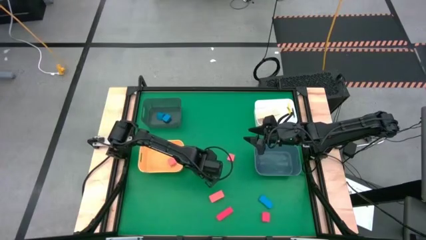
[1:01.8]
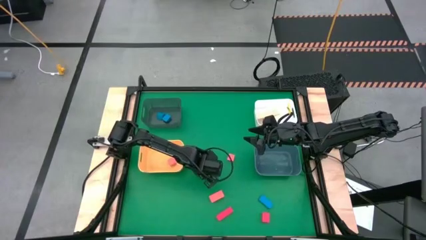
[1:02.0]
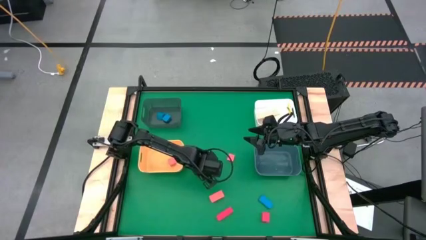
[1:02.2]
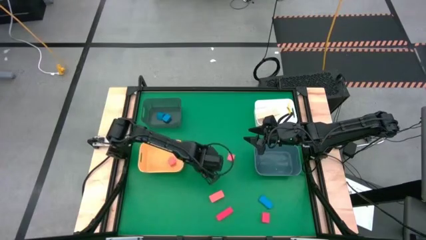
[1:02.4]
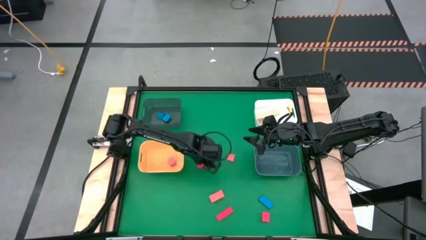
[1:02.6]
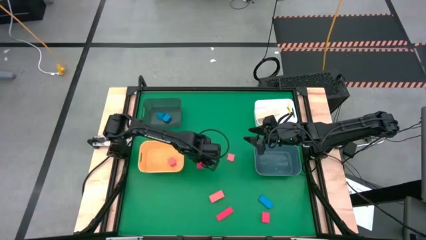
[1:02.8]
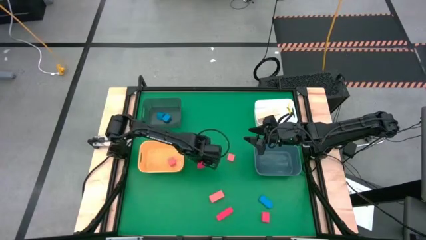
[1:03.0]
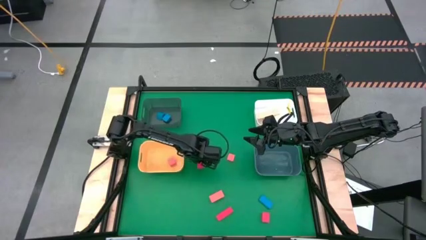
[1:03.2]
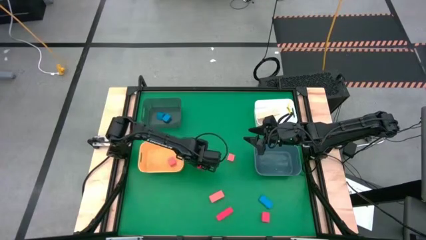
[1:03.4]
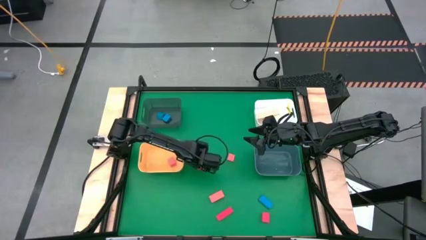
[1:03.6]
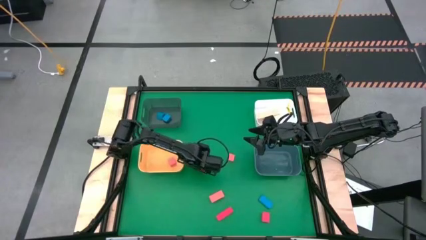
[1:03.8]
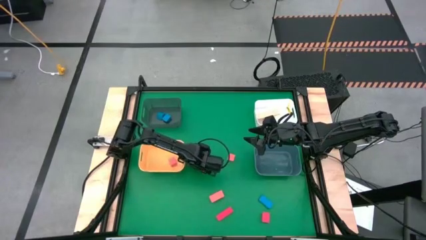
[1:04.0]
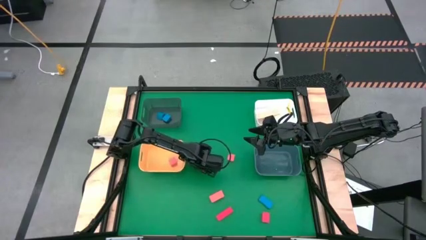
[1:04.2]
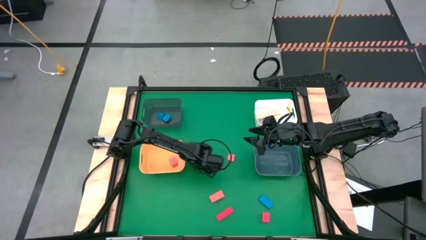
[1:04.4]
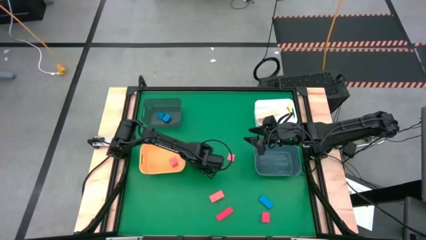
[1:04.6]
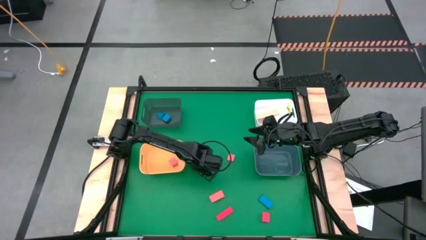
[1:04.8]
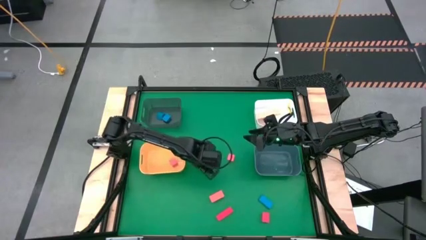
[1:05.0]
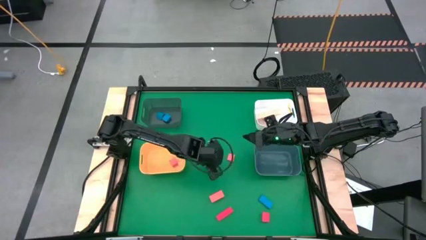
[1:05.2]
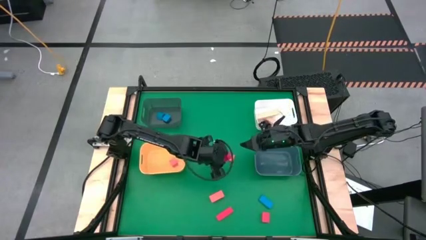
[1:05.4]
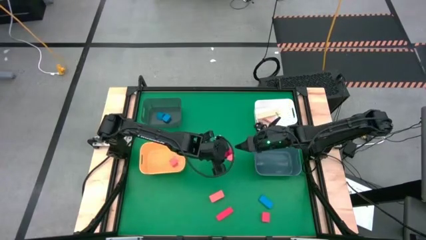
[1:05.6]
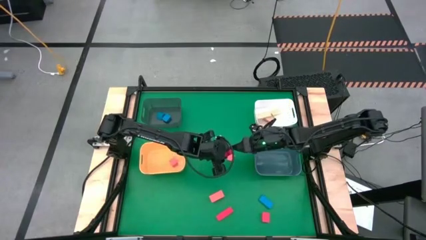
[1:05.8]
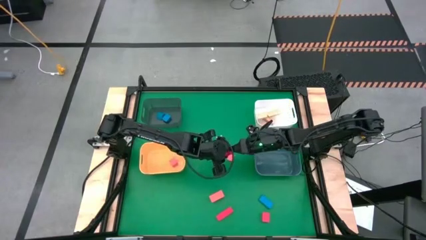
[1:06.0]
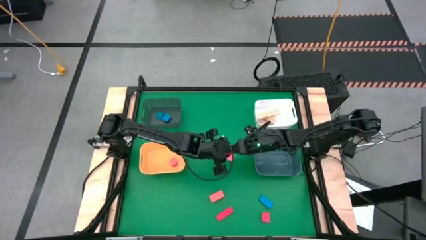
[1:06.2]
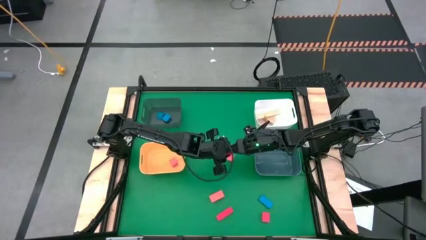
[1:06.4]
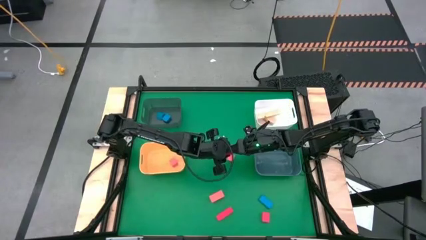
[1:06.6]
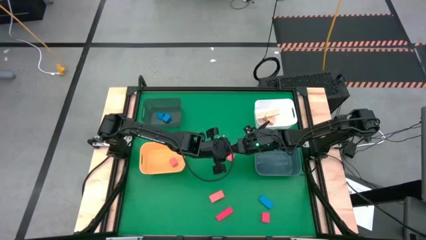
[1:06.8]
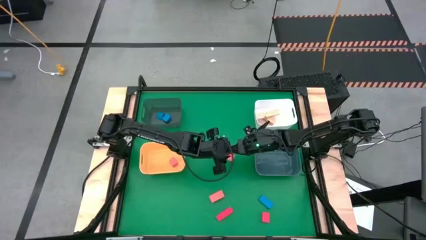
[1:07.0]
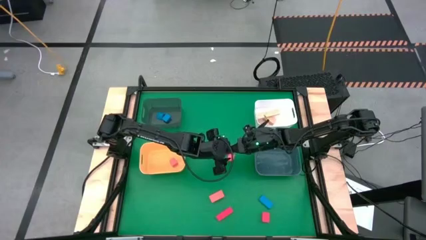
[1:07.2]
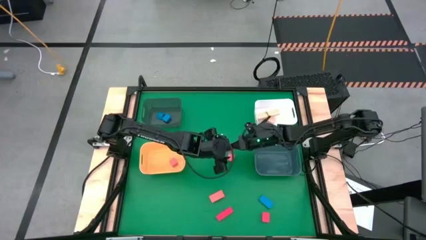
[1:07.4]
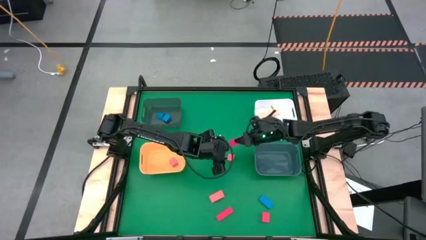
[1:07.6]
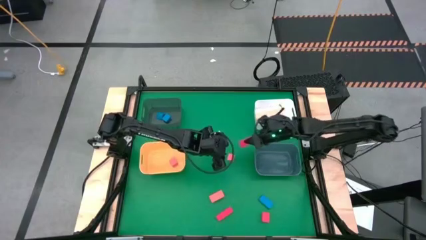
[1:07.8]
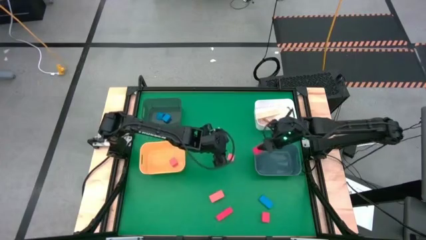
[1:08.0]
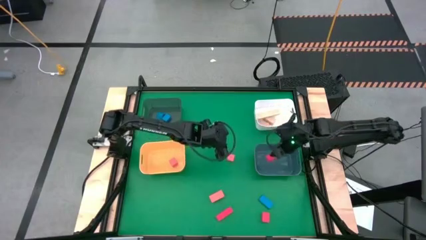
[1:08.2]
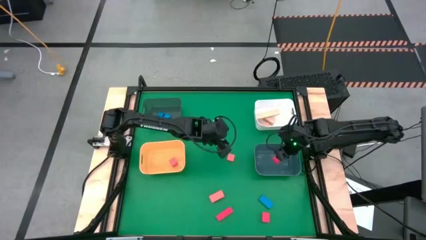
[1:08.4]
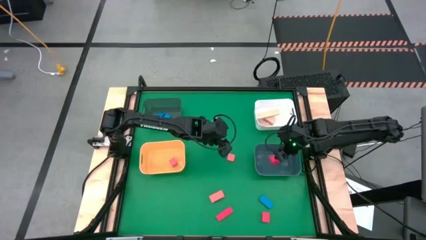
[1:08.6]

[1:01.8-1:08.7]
Task: Sort & place blocks by color
Put the top left red block into the green bin

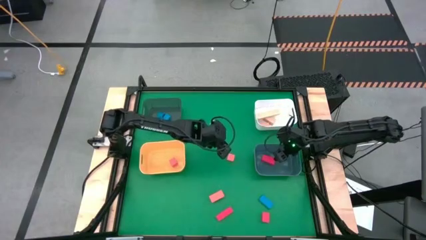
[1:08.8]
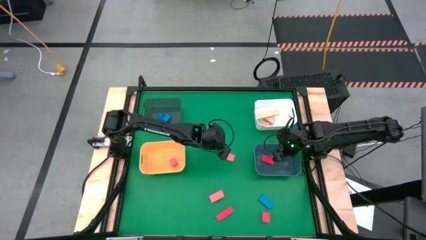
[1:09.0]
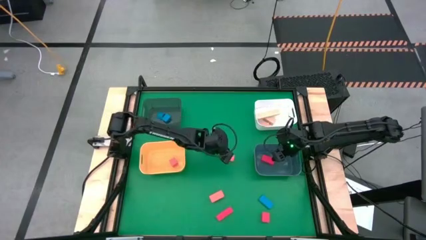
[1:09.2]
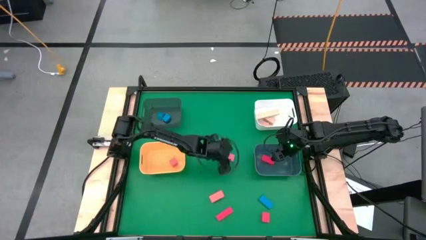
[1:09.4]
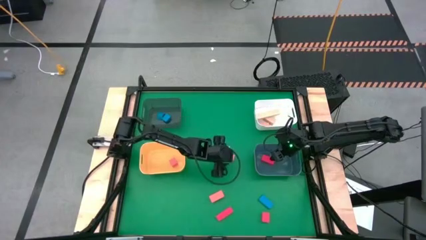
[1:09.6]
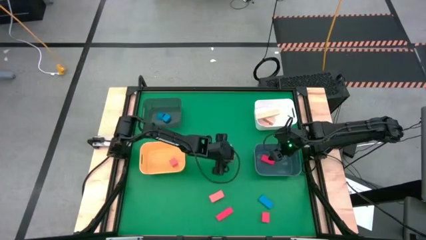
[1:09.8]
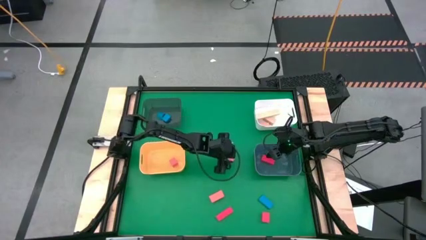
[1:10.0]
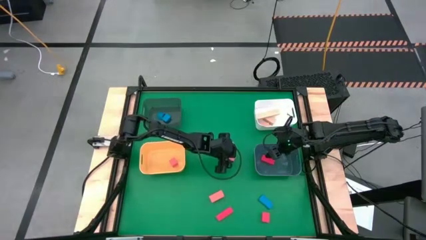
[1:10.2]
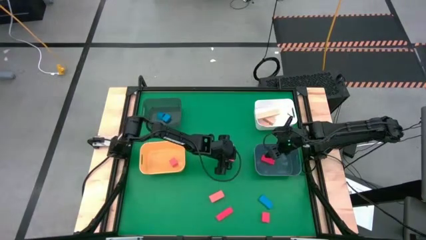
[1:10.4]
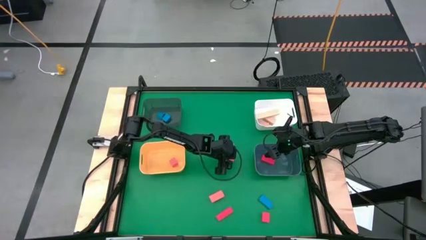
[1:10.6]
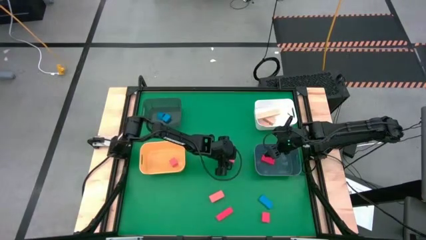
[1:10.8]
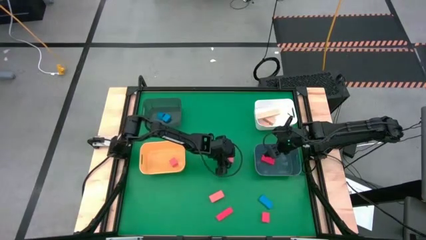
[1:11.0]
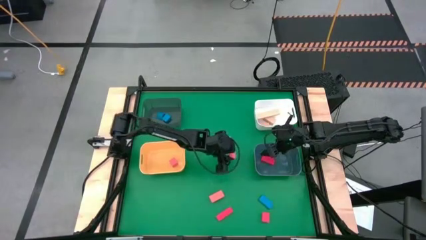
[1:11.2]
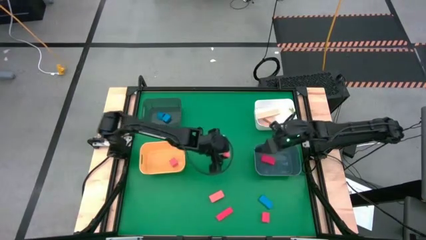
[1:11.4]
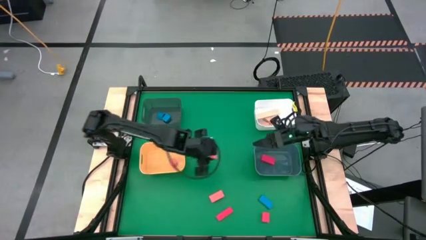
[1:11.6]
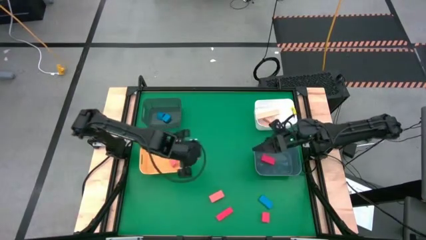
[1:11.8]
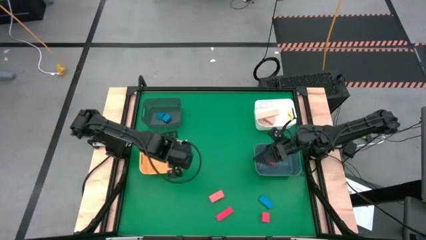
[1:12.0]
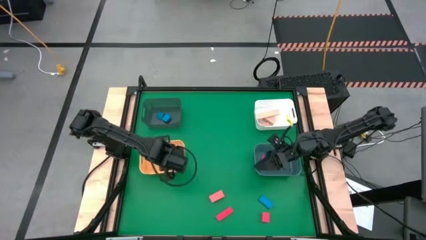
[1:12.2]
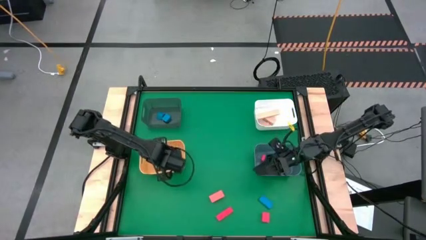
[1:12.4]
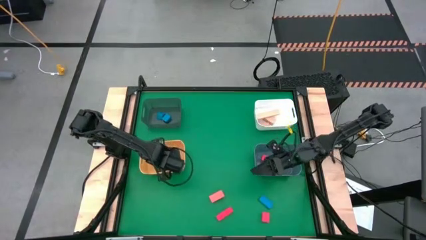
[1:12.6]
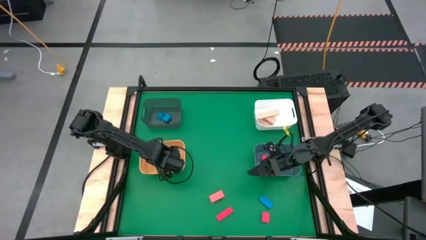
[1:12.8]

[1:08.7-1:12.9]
Put the top orange block into the yellow bin

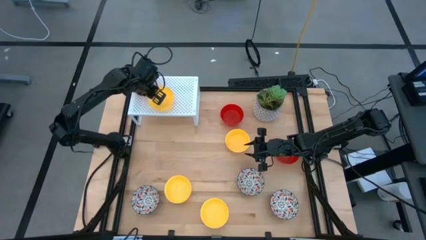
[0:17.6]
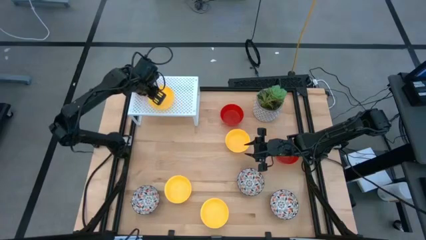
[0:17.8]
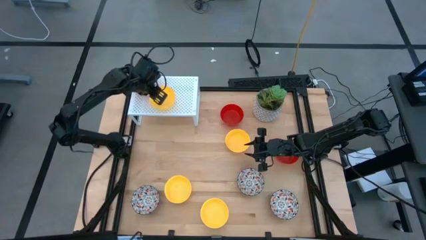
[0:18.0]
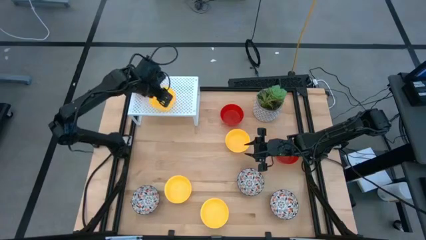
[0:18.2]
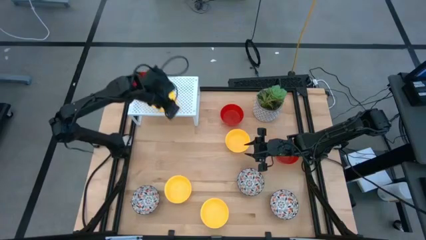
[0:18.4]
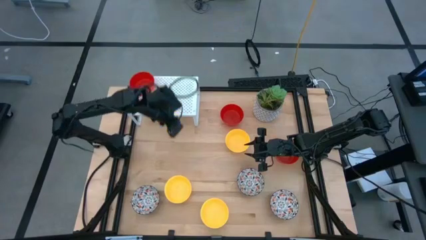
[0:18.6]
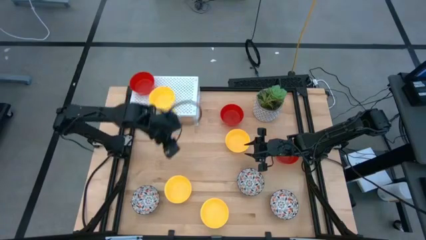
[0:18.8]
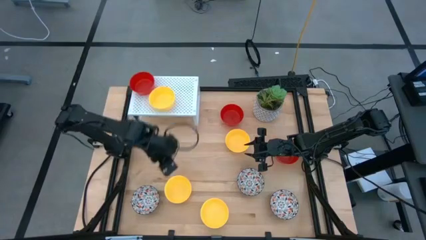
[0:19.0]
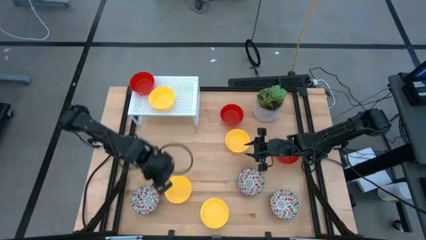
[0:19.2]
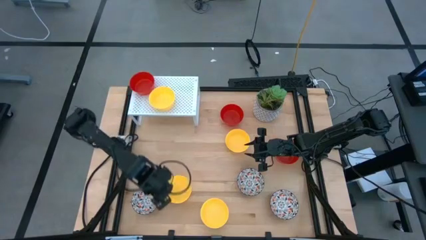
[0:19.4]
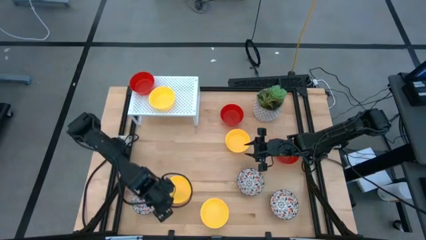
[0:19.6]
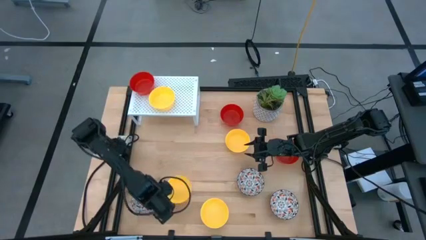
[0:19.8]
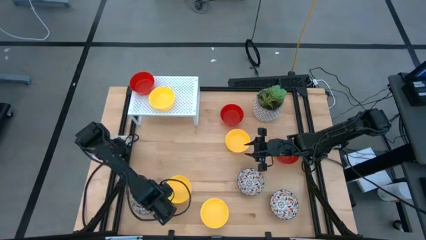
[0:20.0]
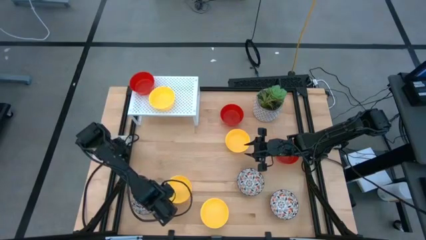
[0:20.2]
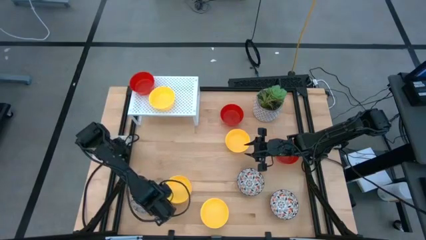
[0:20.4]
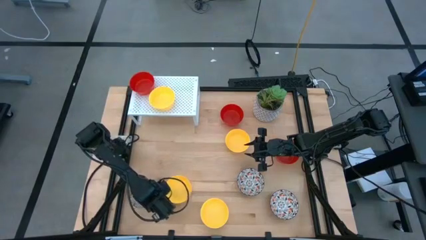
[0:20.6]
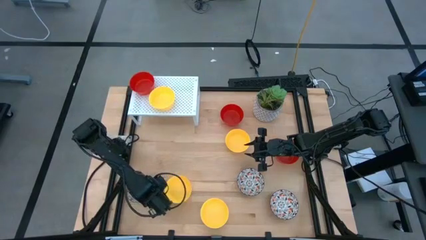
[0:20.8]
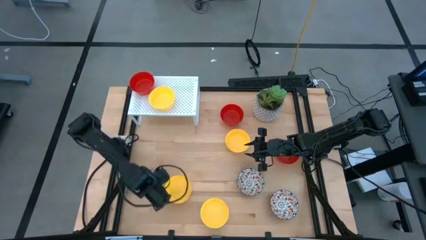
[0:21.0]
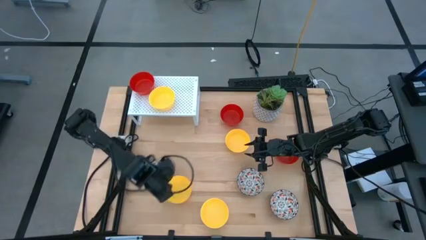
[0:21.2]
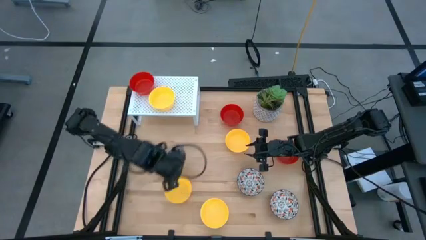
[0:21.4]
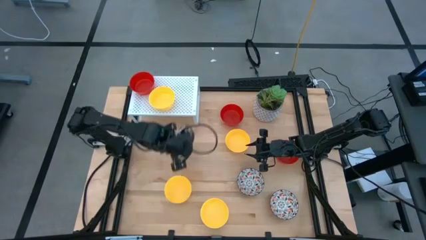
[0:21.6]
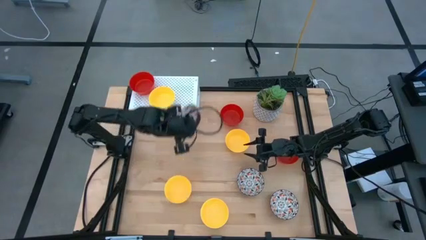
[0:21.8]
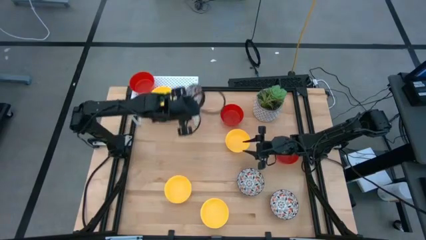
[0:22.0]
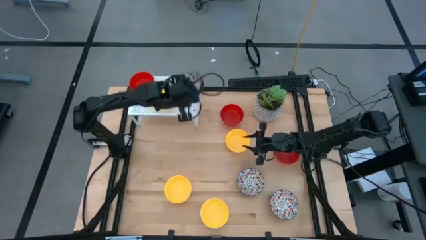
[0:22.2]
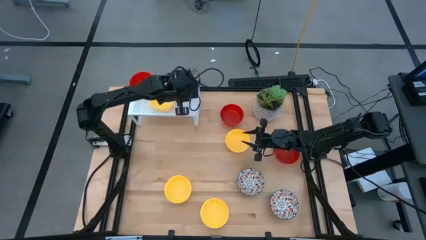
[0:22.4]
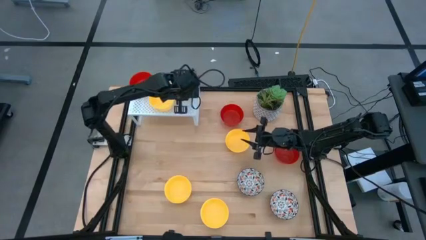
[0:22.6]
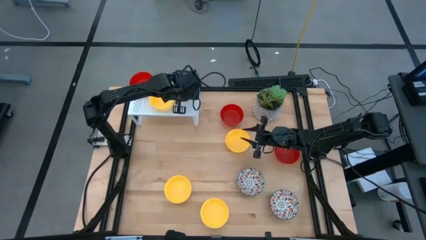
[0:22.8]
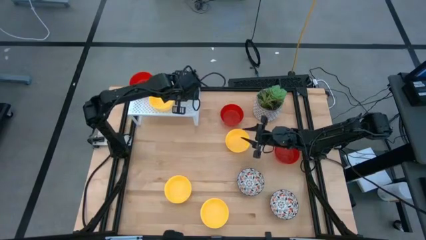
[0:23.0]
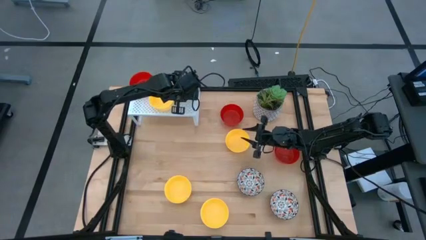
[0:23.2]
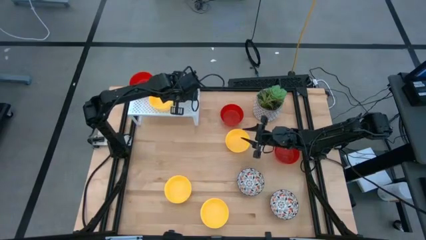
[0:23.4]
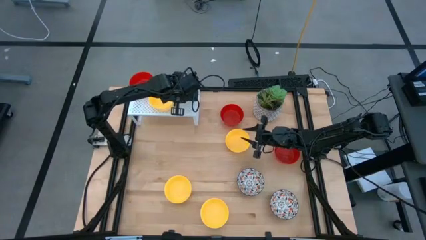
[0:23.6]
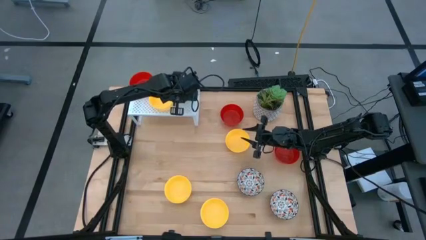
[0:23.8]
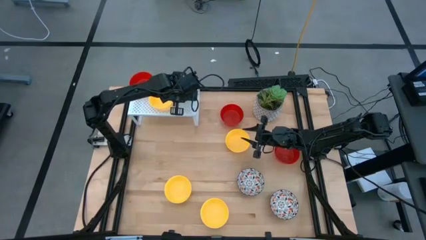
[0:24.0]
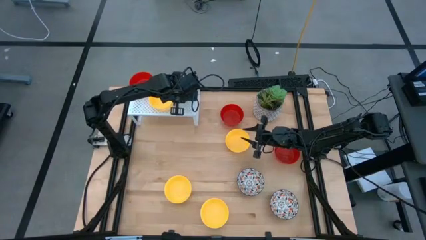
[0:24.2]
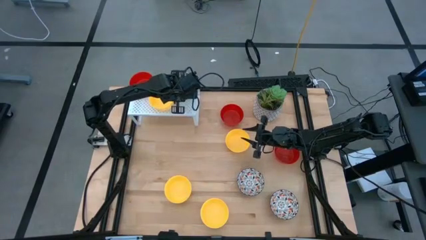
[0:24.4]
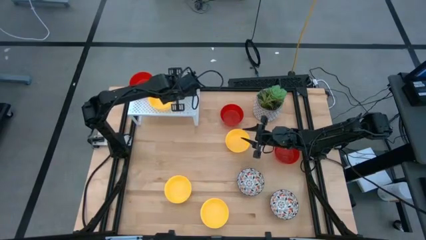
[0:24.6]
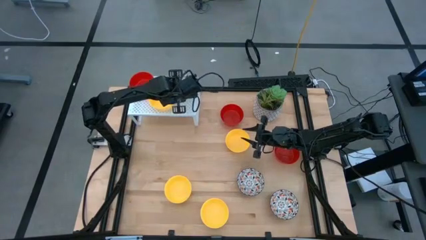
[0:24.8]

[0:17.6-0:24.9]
Task: Pick & Place Mini bowls
Put the bottom left white patterned bowl on the shelf
